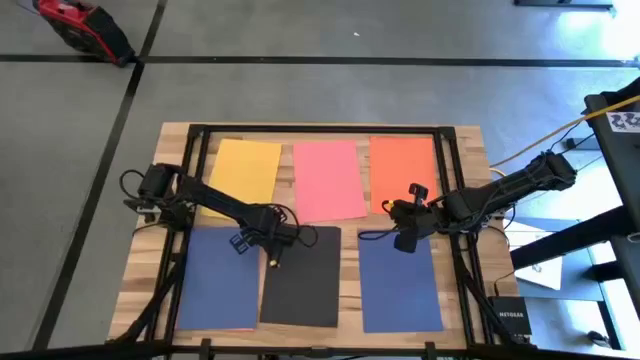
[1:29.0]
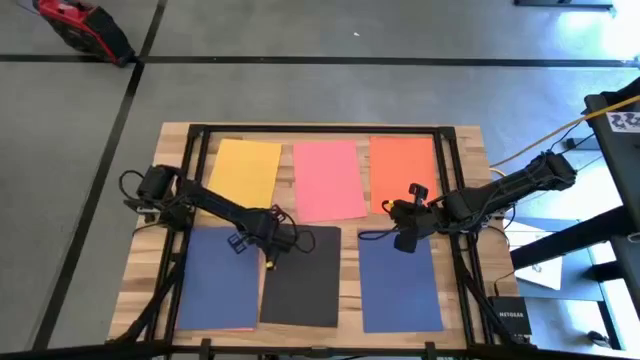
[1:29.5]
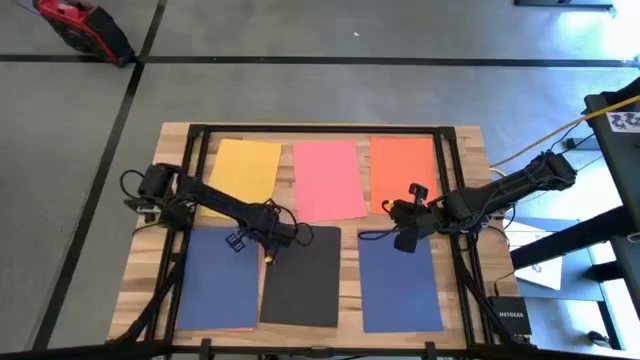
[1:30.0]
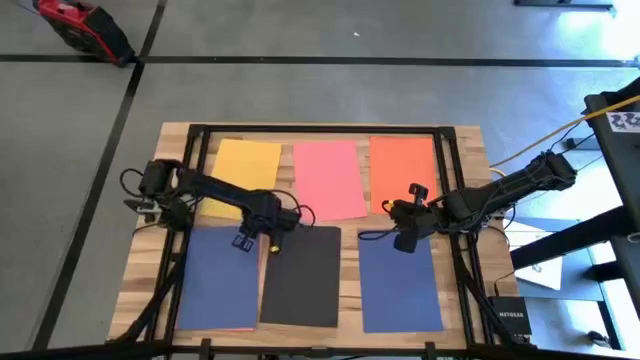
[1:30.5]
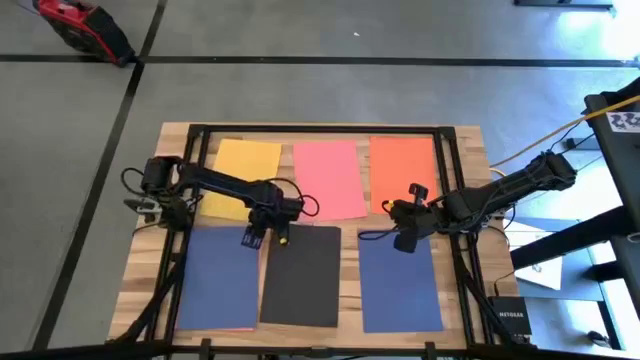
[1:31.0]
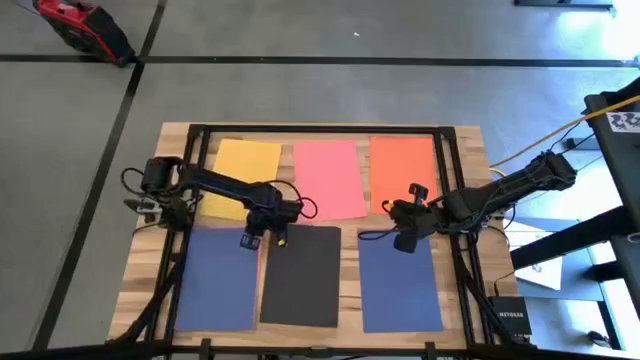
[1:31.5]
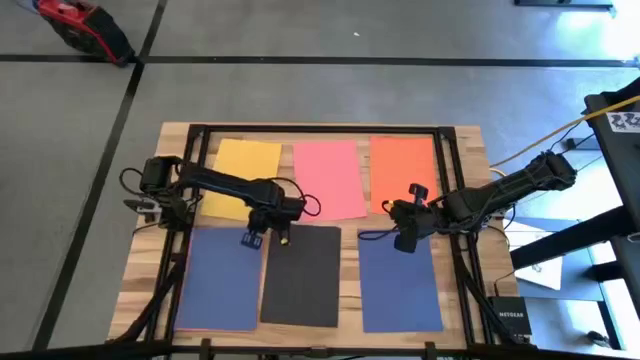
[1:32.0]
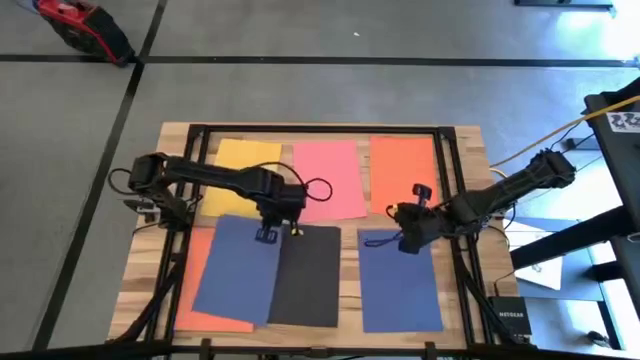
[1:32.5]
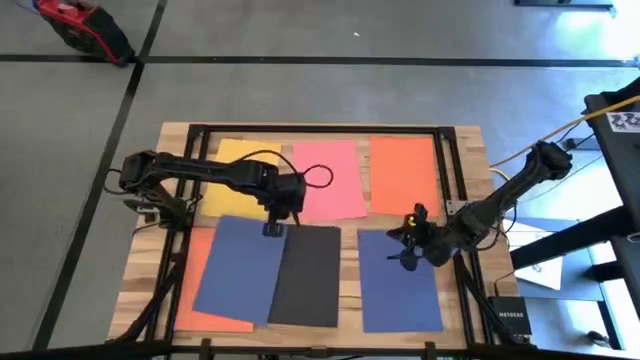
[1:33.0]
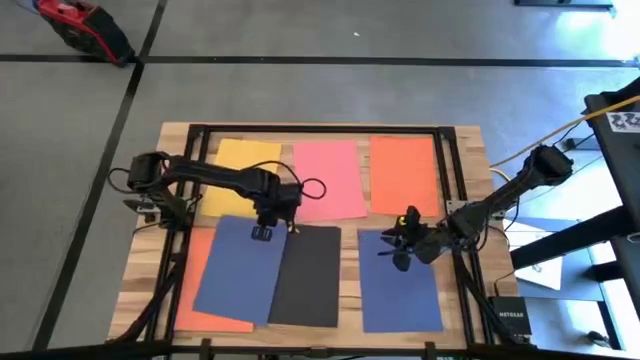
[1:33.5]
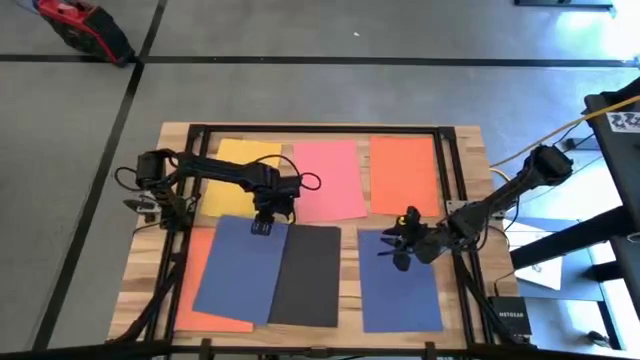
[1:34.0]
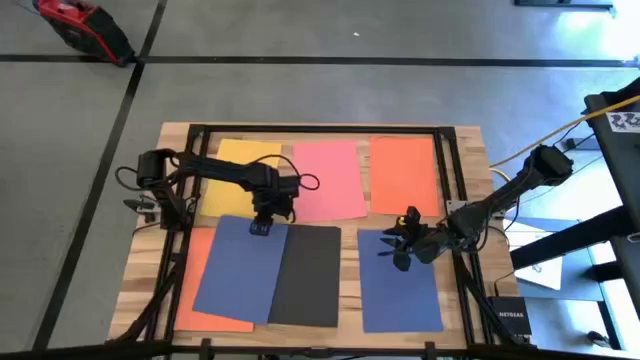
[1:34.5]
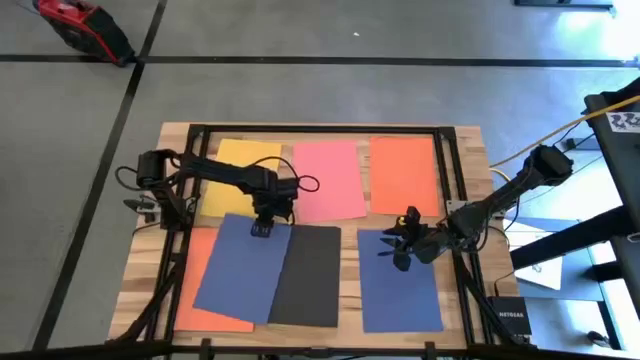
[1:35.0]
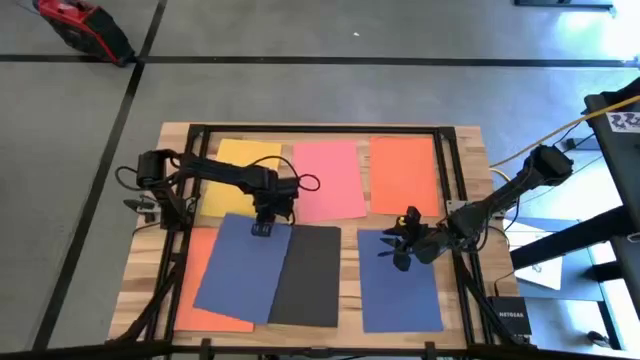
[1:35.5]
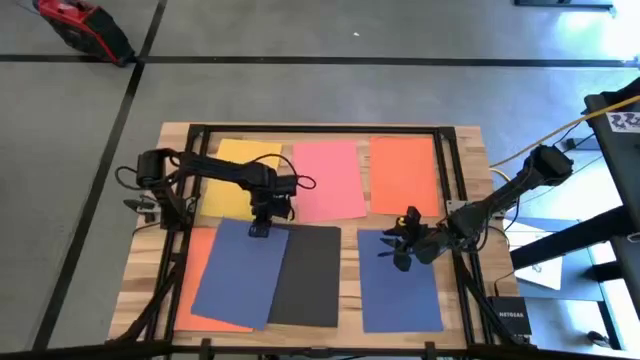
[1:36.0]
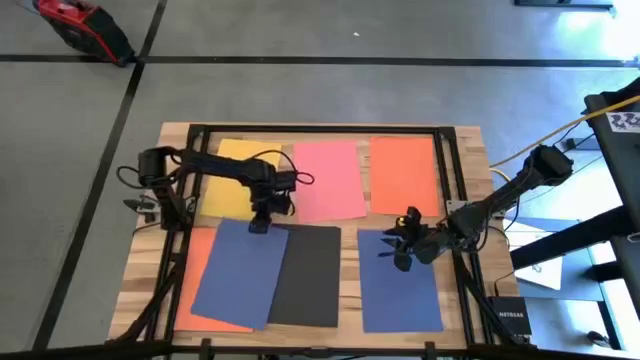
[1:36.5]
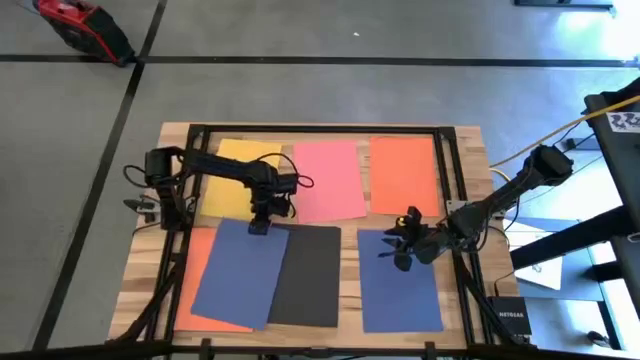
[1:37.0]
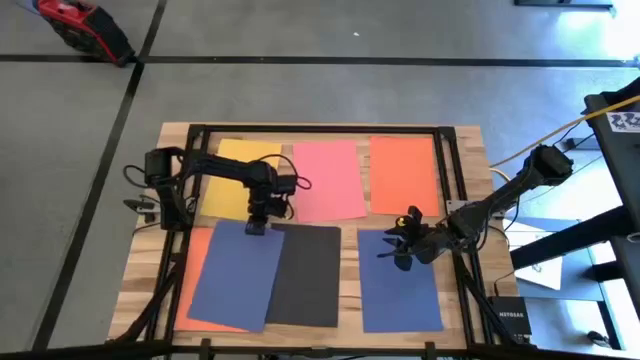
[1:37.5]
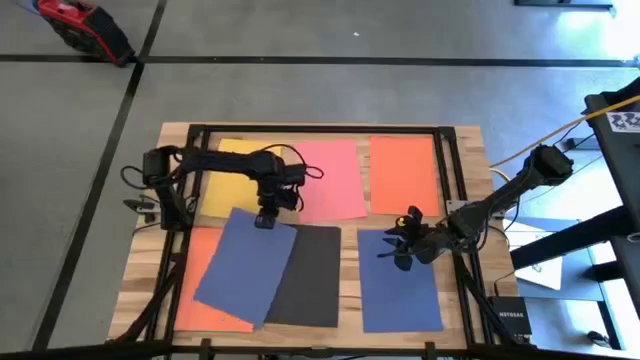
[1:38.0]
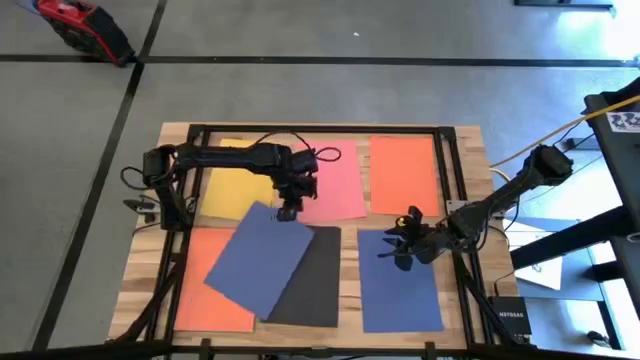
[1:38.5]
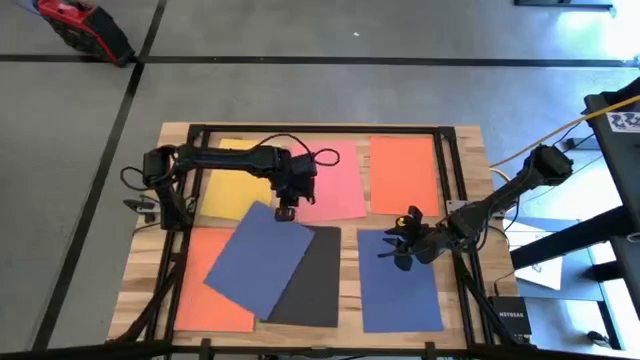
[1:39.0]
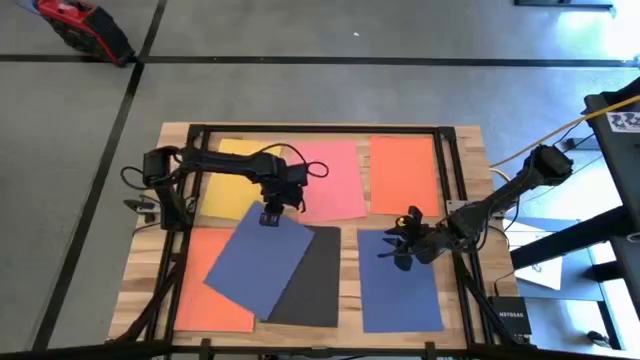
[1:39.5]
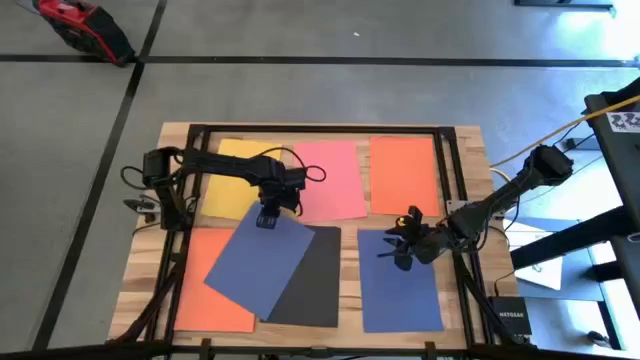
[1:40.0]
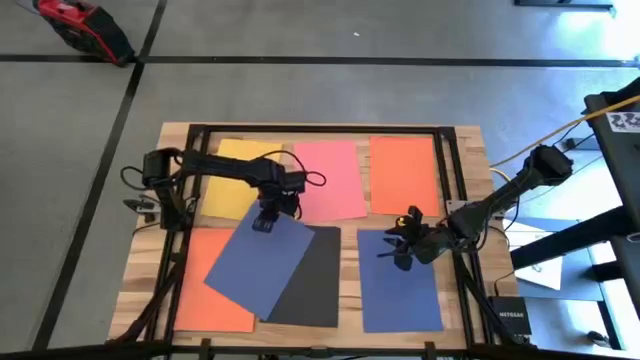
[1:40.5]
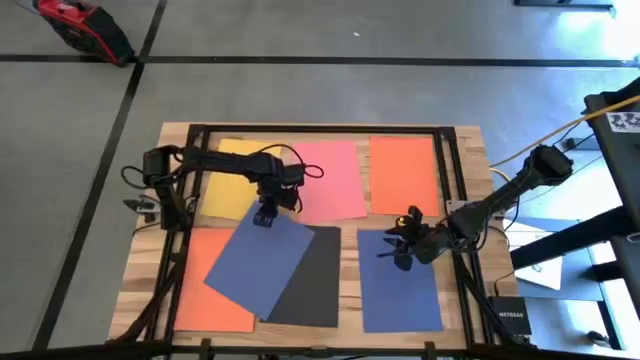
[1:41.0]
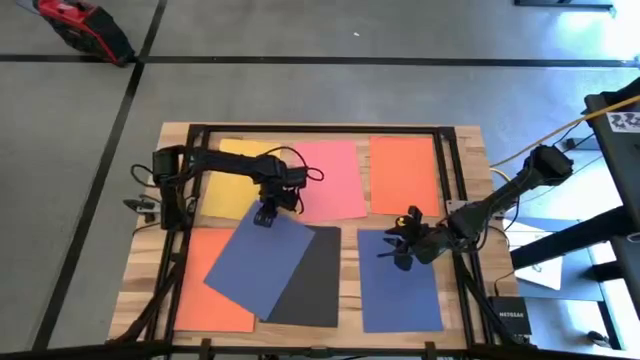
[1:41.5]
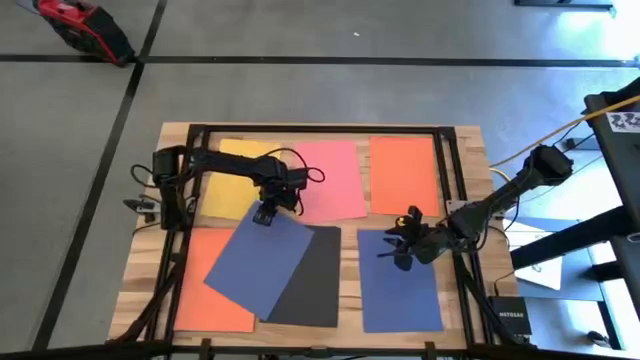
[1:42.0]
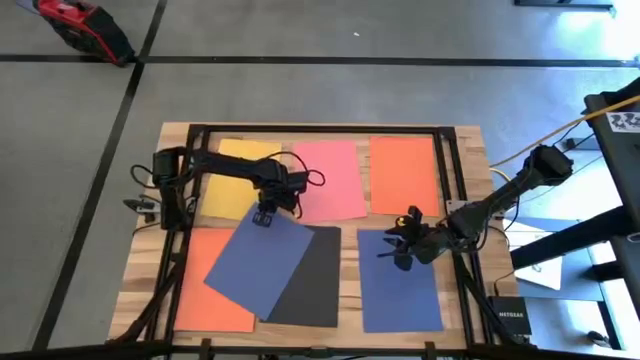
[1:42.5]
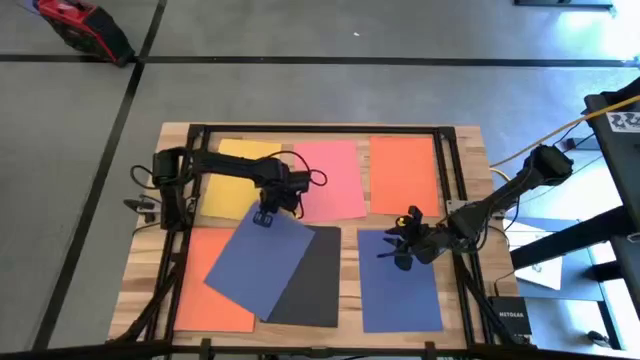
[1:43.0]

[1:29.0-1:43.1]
Task: Organize paper
Stack the blue paper on top of the blue paper on the table

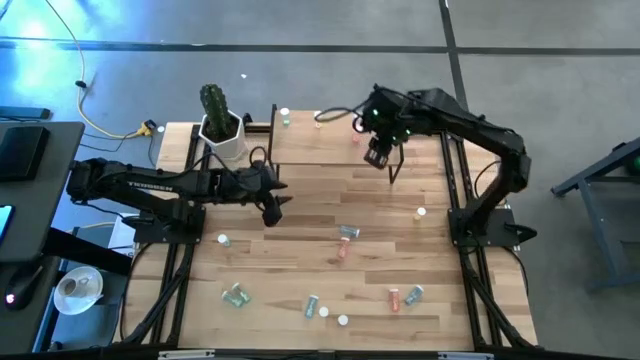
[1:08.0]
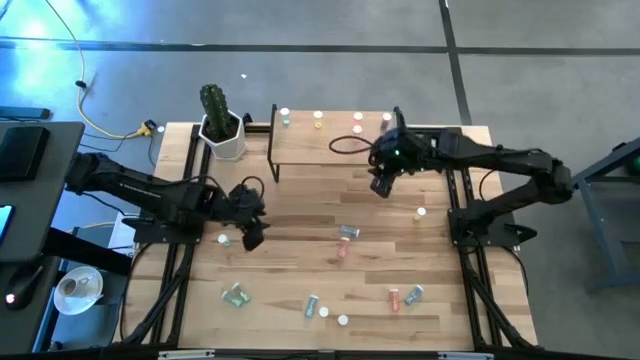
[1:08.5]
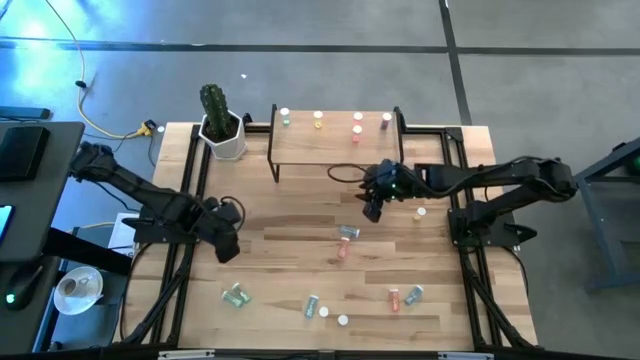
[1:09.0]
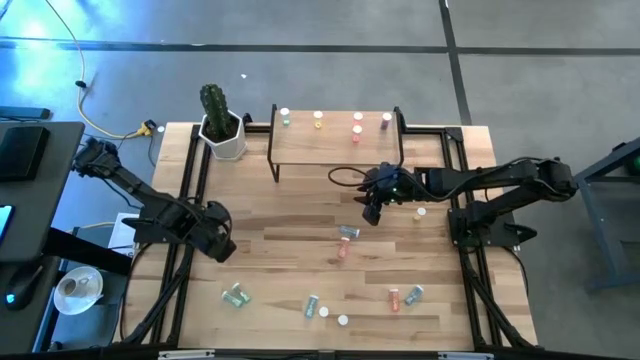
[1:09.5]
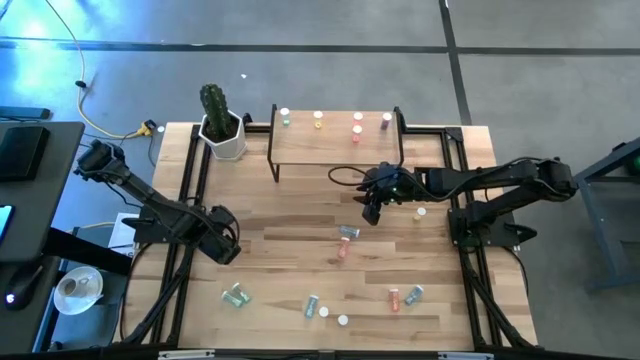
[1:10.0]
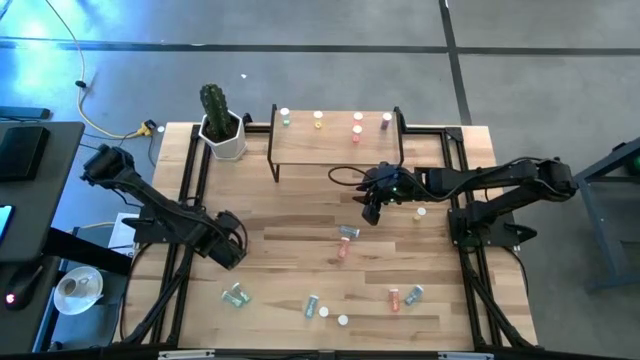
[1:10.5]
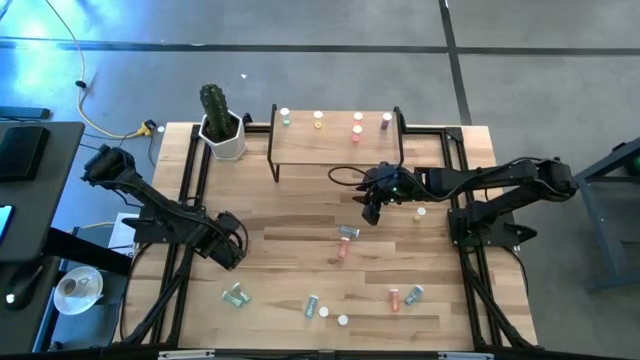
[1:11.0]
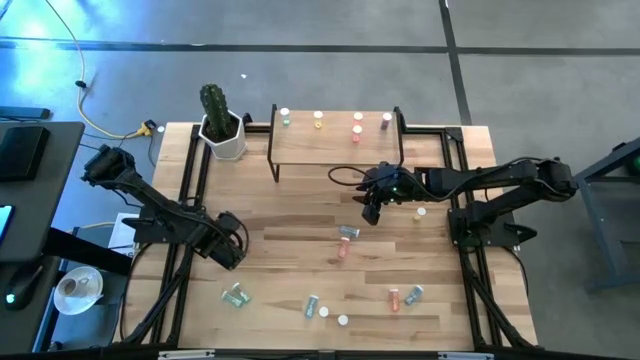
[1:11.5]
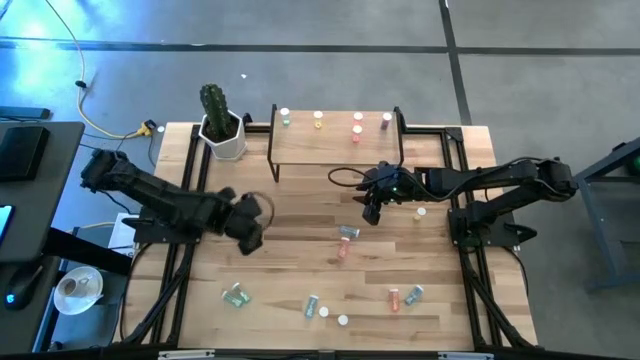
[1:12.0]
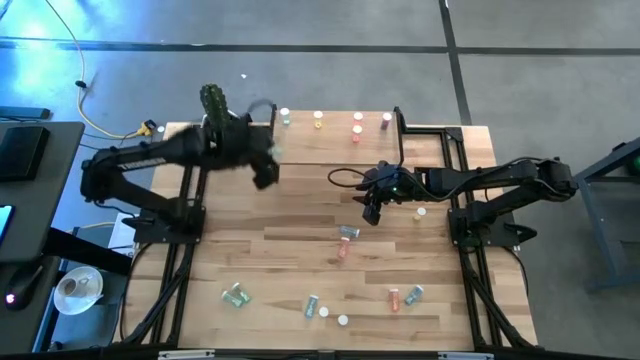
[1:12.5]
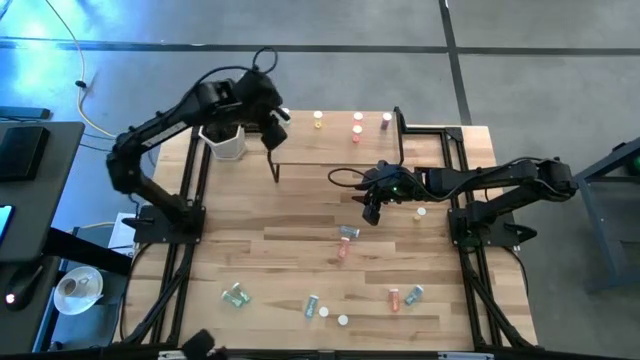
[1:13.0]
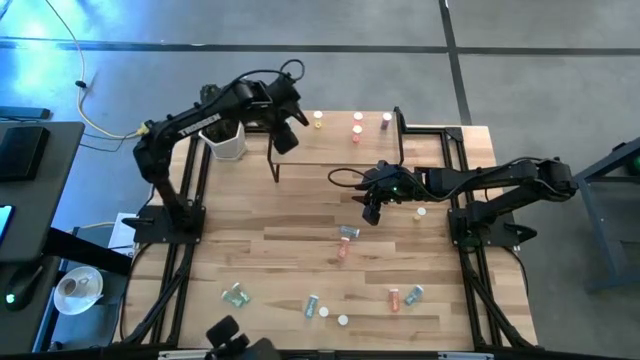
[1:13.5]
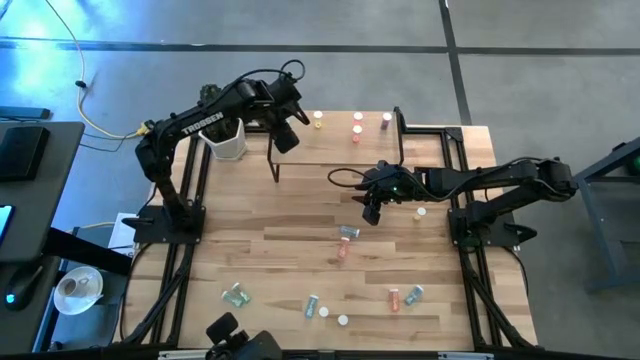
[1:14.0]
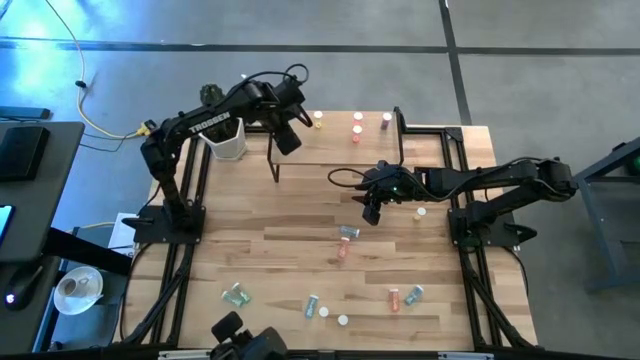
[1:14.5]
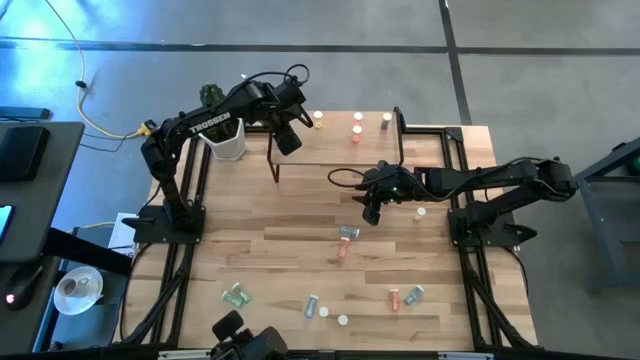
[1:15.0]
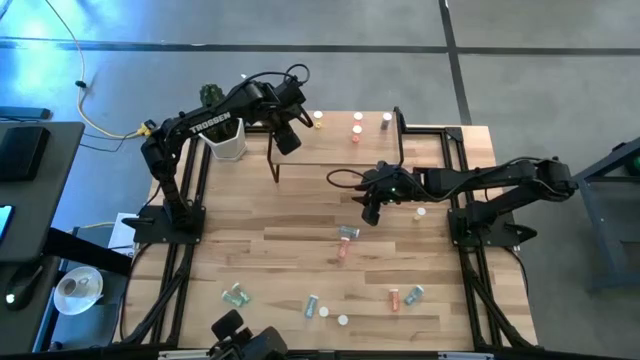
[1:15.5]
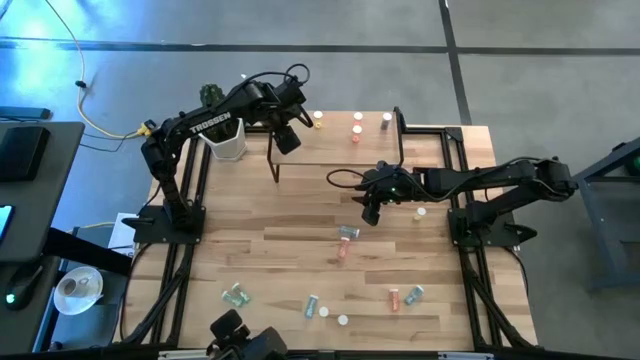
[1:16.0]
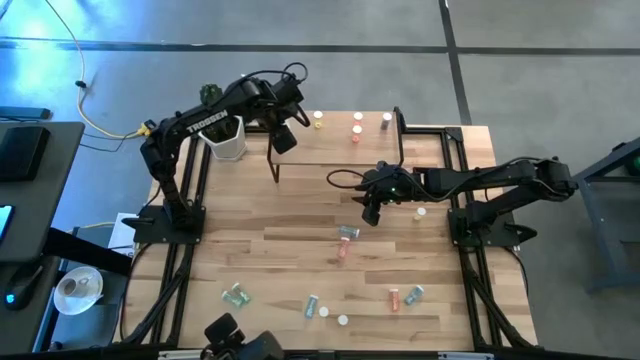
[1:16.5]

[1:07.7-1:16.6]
Task: Pick and place medicine bottles onto shelf by color
Put the light blue pill bottle on the shelf aligned with the other light blue pill bottle
